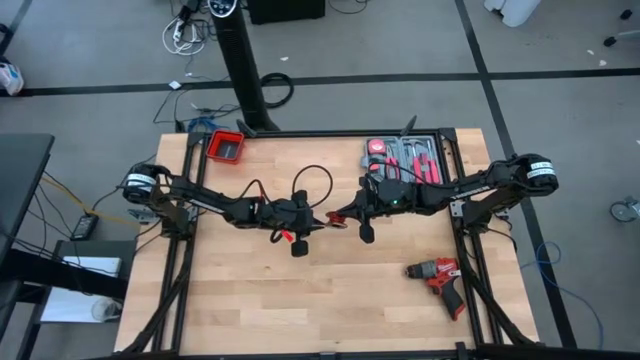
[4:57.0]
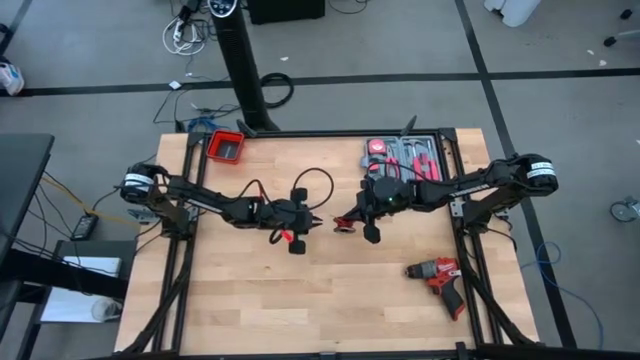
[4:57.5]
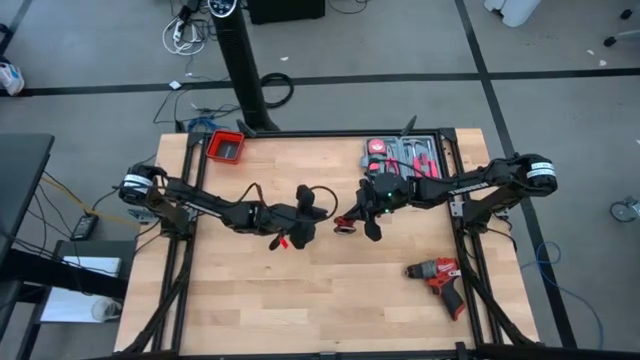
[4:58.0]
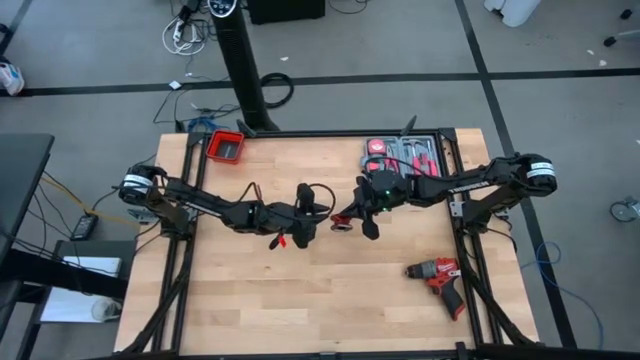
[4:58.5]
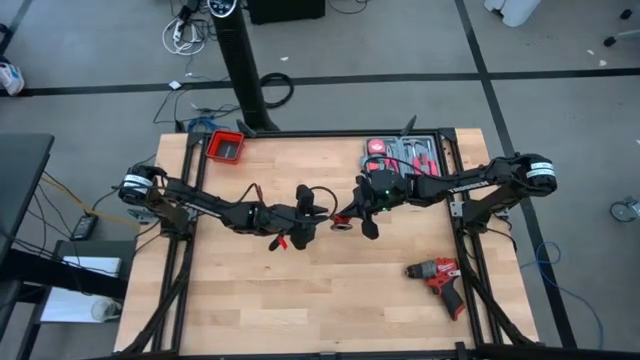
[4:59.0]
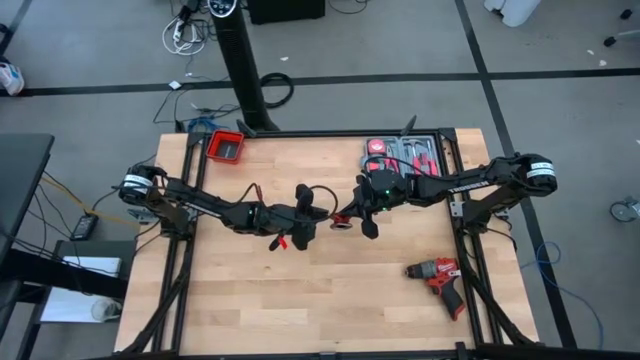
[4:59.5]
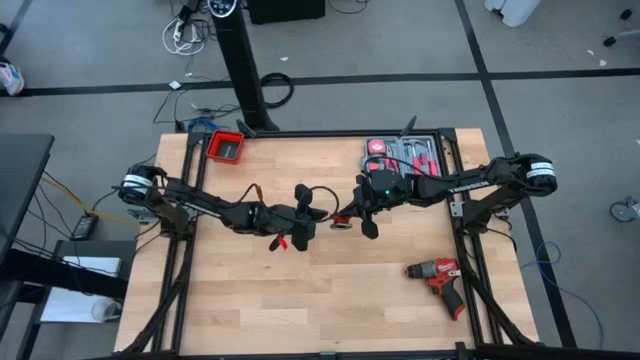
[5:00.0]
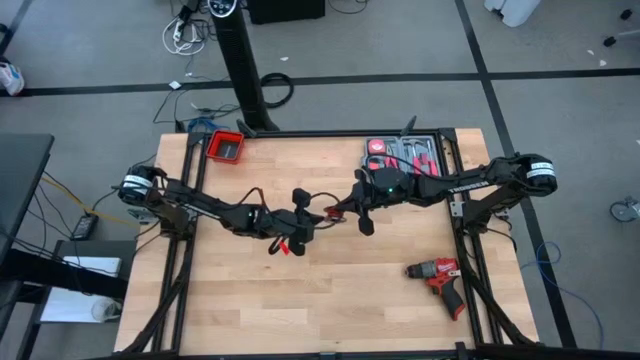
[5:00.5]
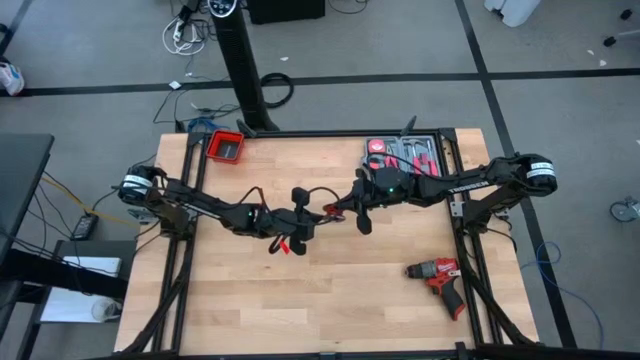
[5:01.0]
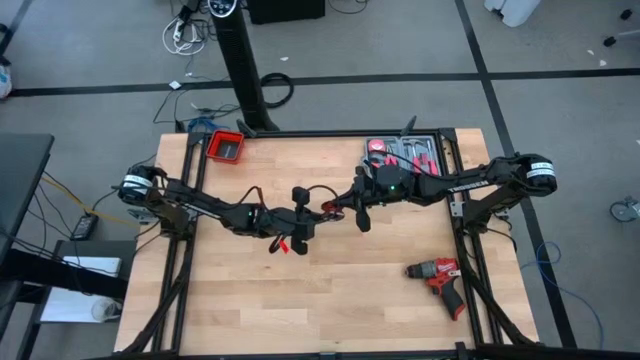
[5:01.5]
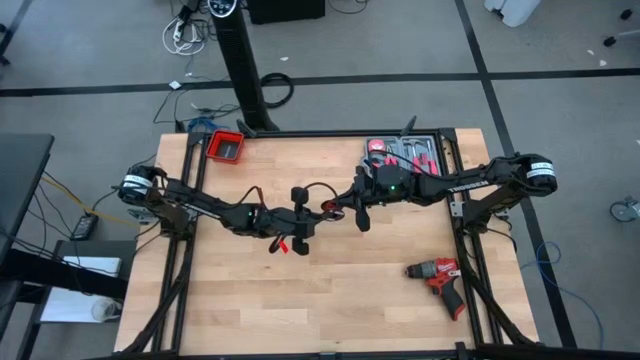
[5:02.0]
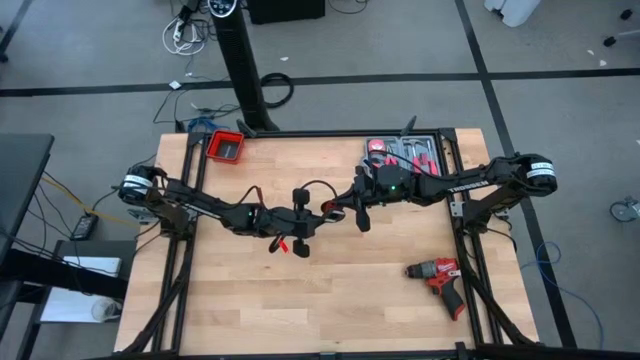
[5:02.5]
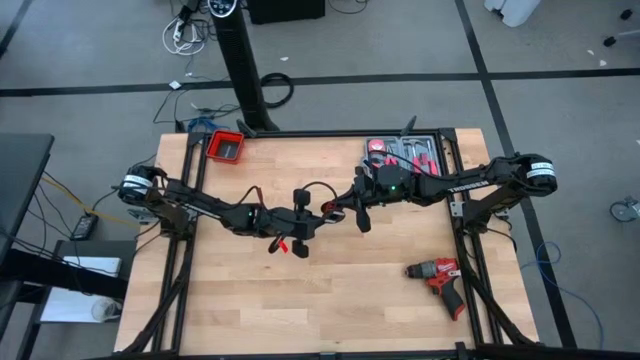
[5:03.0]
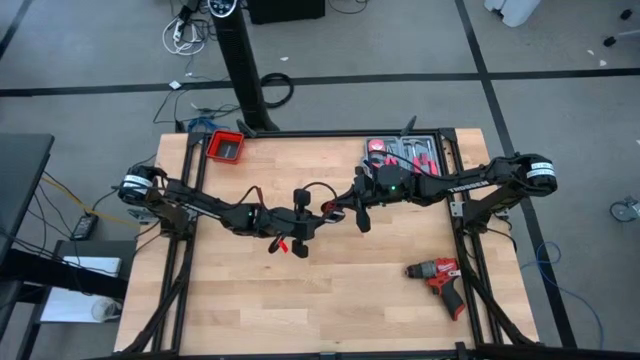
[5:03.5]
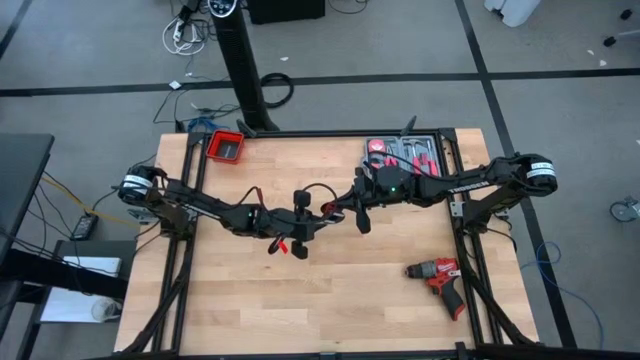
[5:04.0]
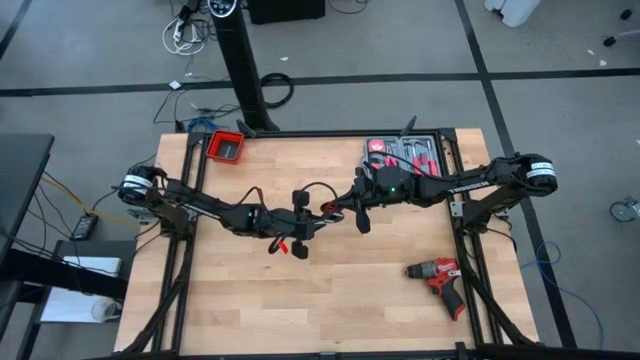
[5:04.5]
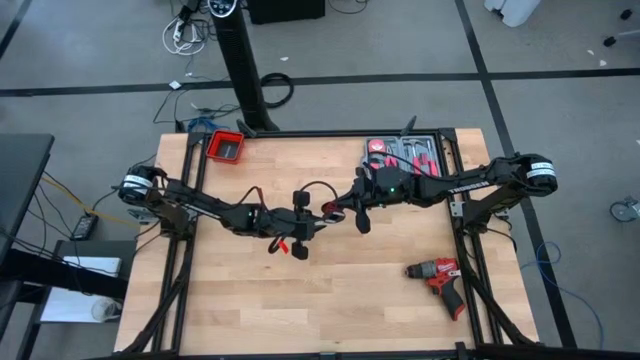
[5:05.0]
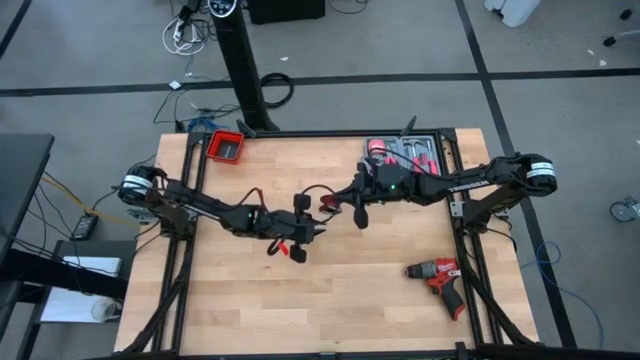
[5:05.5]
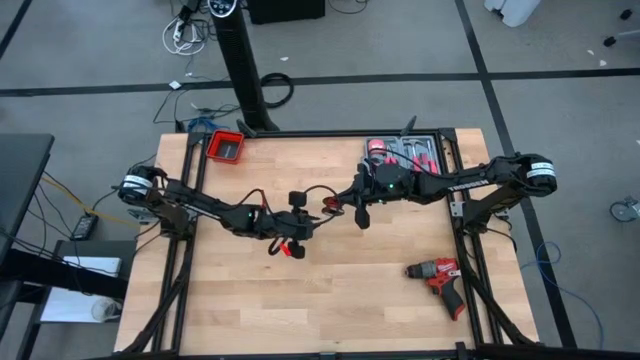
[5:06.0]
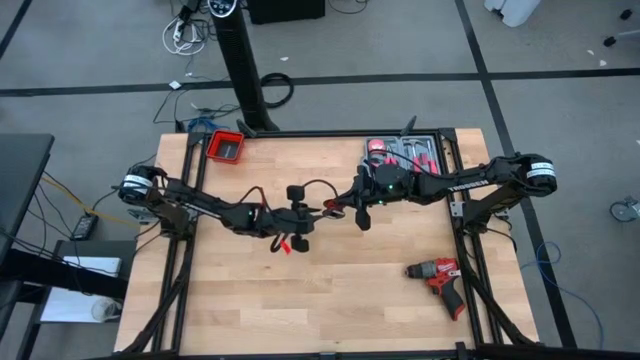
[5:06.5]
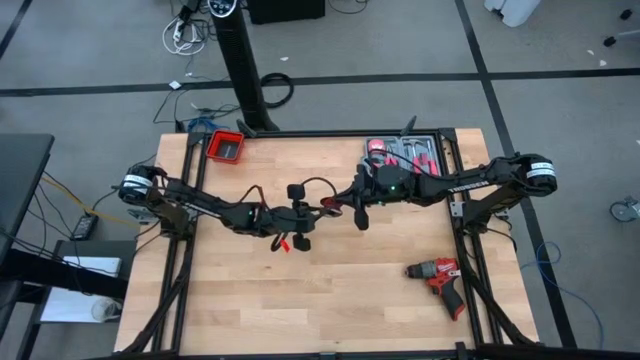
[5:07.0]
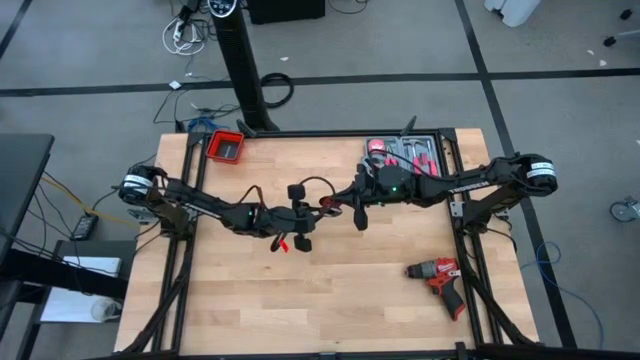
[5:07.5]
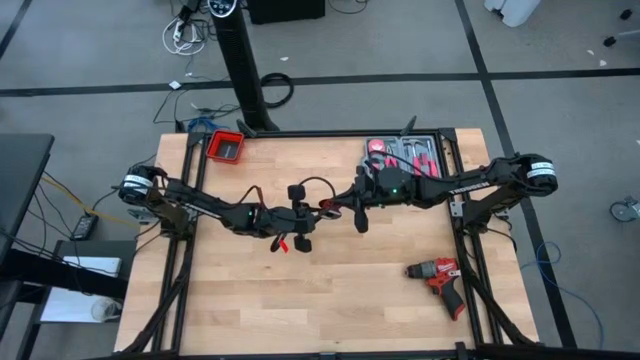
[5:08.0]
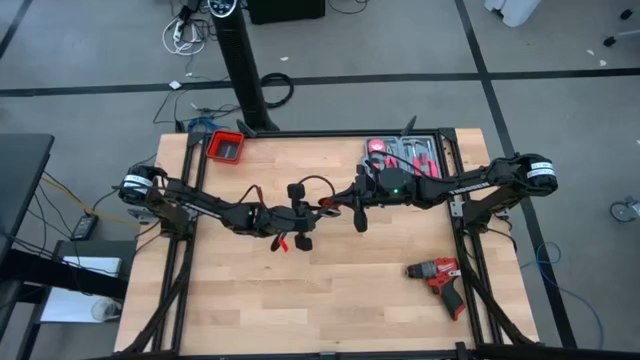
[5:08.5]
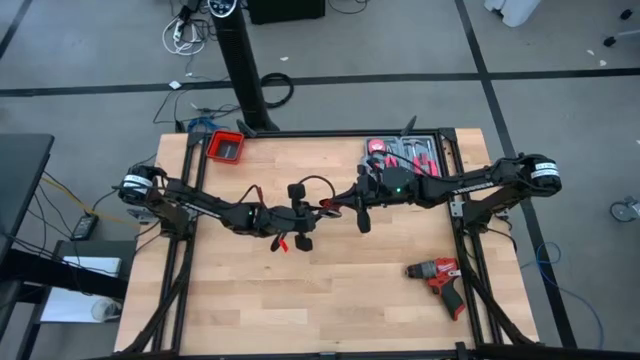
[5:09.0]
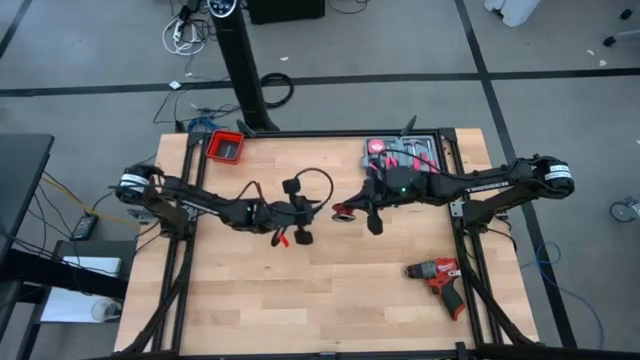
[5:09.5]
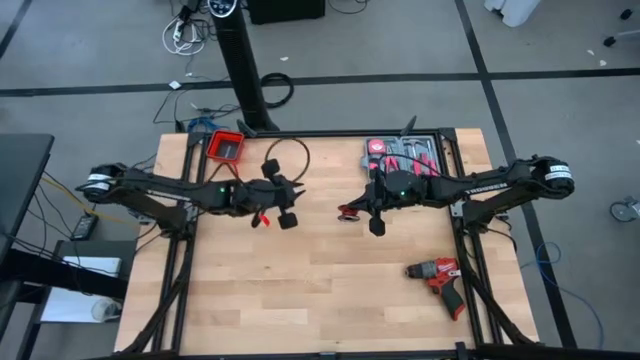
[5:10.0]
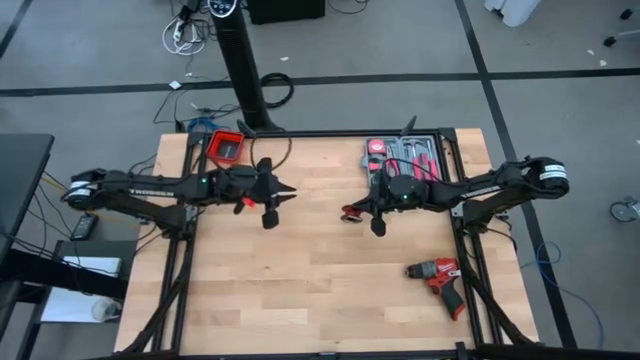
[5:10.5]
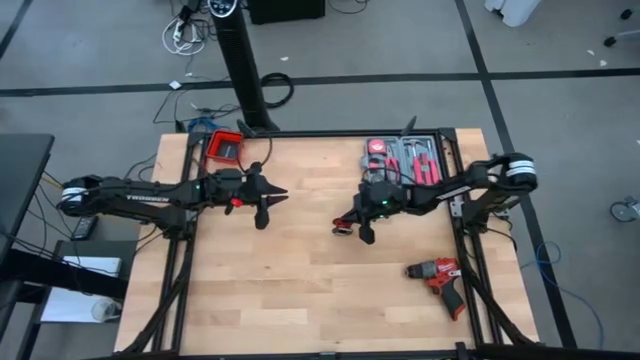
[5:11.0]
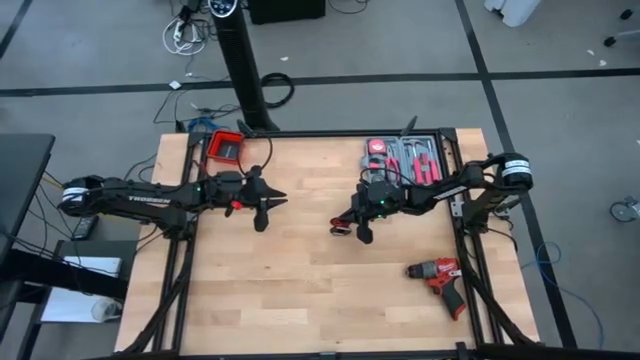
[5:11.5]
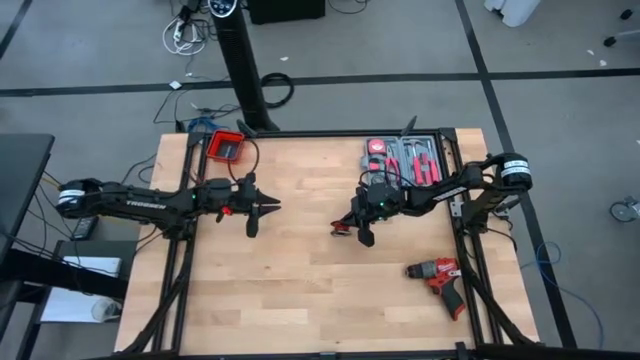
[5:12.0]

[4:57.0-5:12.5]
Task: Coil cords
Coil the red wire onto the black spool

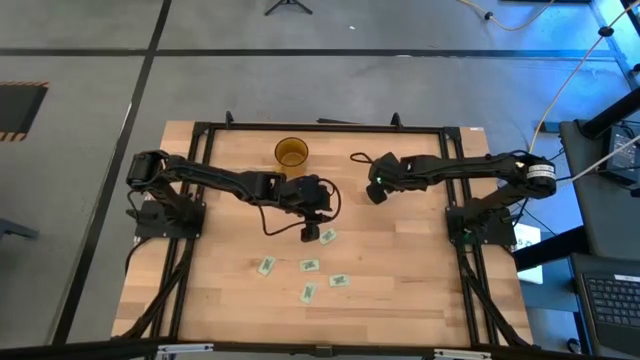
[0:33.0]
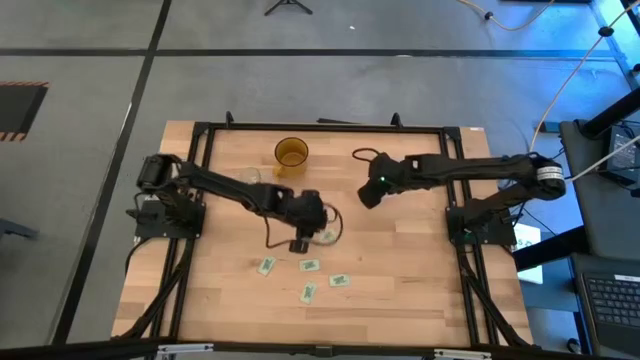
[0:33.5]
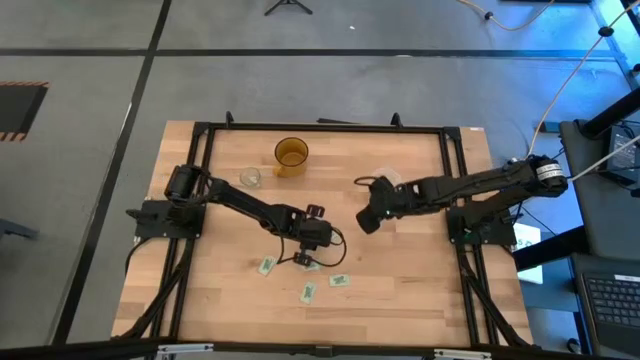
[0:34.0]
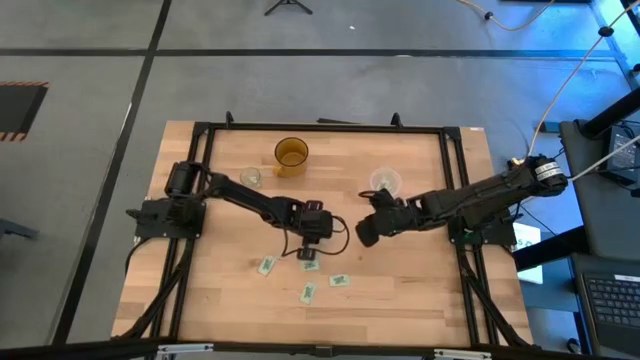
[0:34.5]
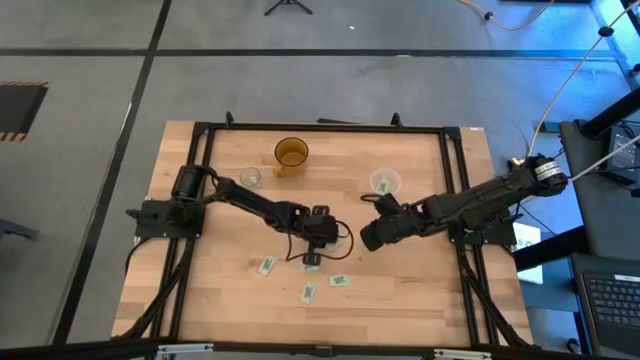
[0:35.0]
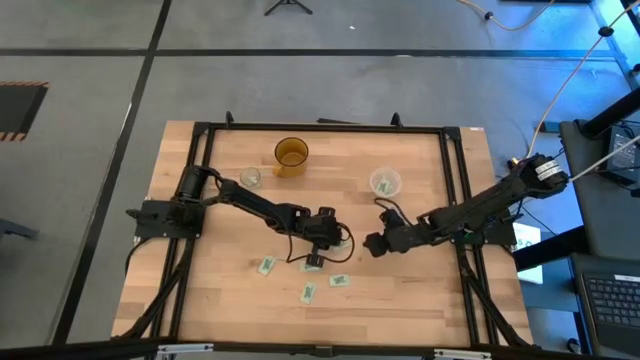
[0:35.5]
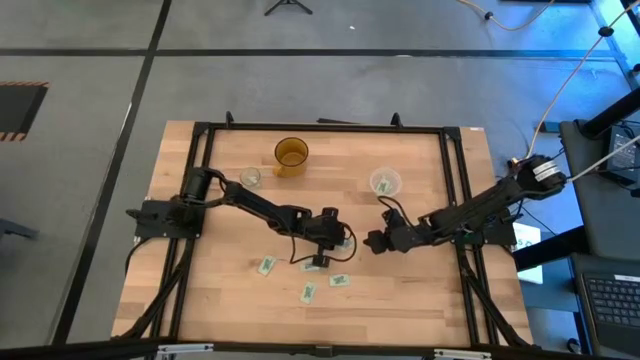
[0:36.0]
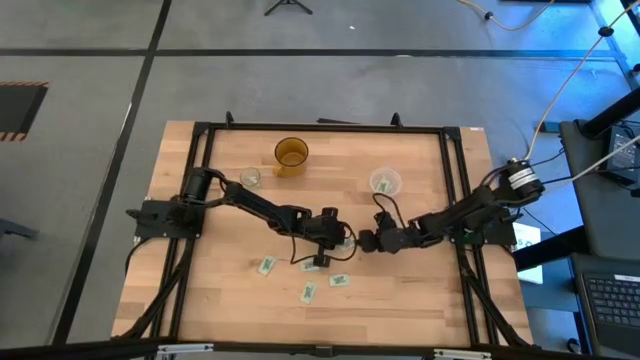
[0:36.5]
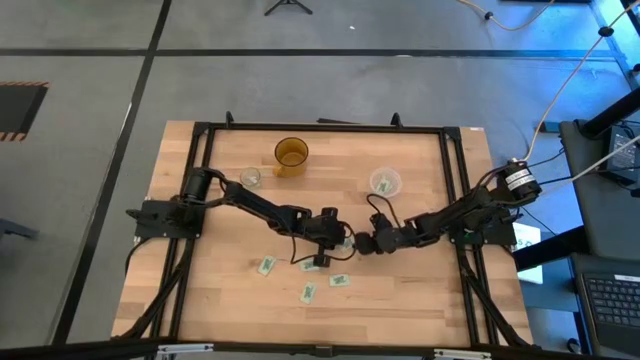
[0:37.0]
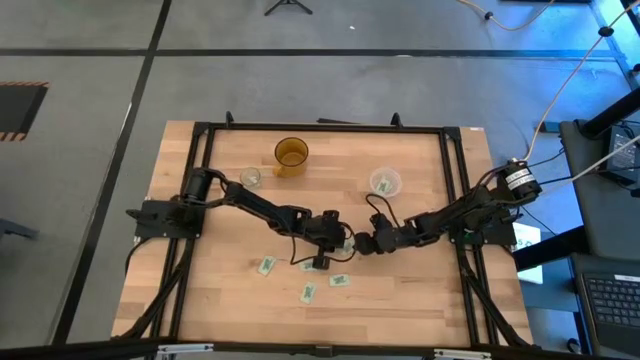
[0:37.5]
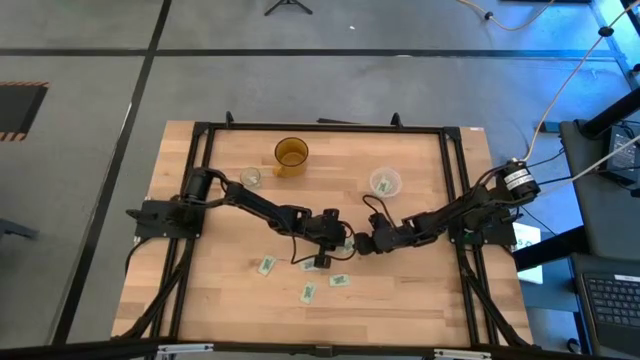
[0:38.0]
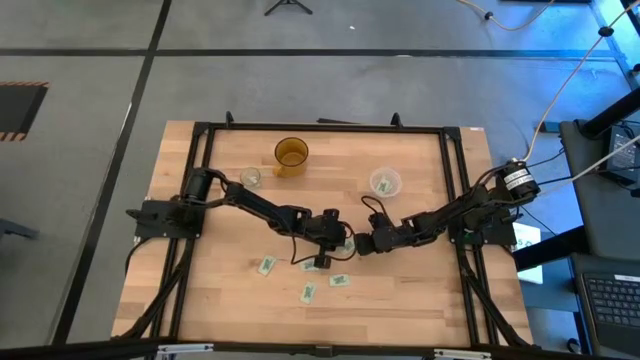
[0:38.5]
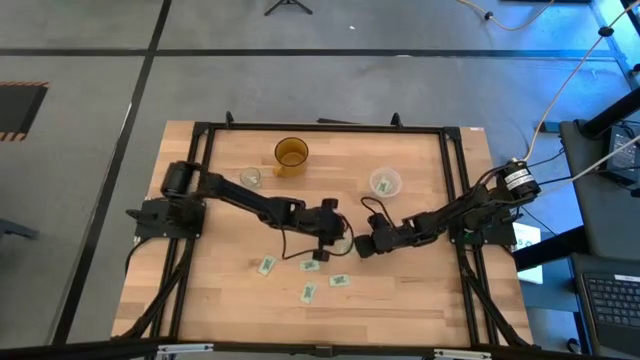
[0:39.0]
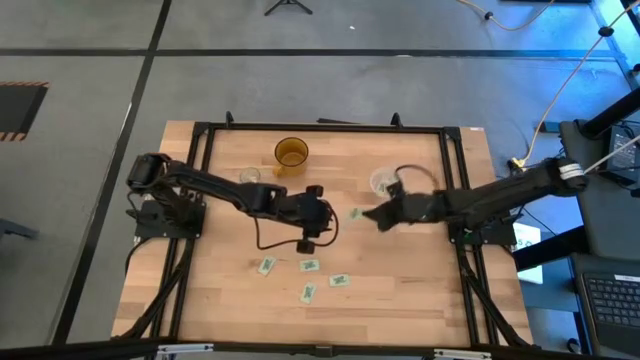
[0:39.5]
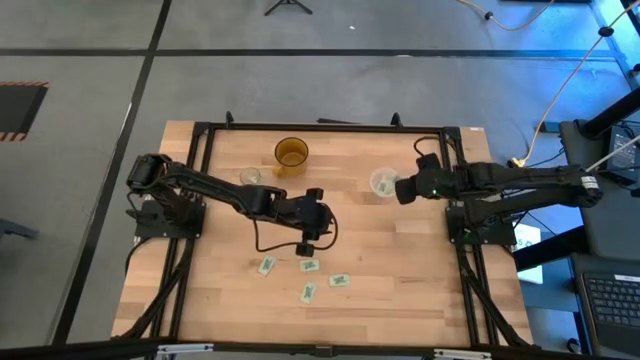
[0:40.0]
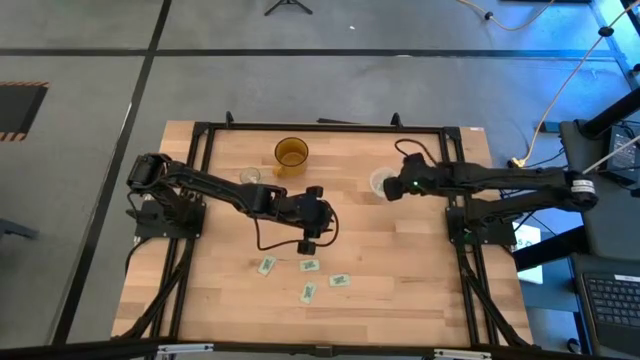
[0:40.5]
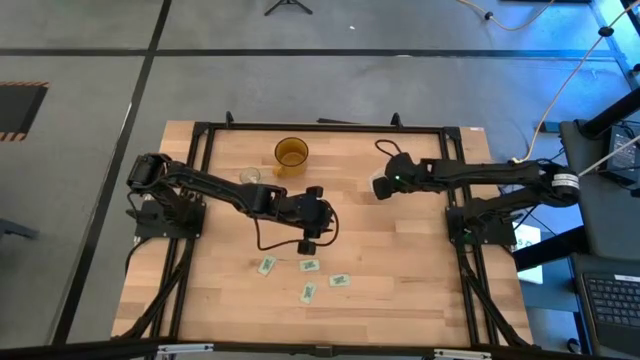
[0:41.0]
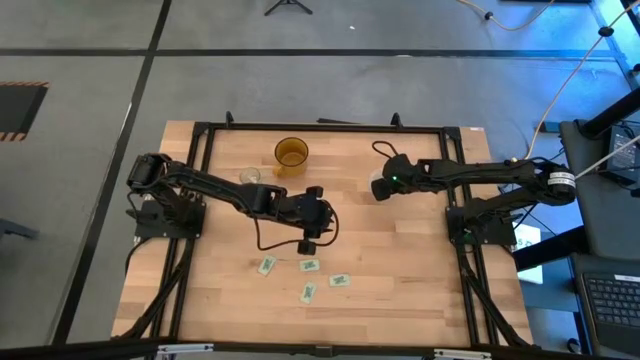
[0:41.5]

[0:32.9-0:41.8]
Task: Pick and place Stevia / Truvia into bins
Put the stevia packet into the transparent container
